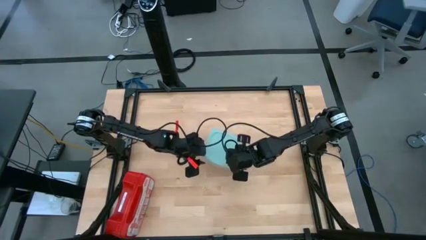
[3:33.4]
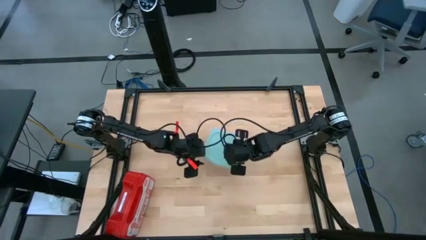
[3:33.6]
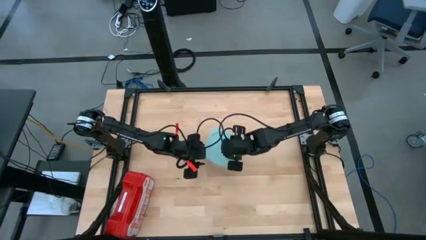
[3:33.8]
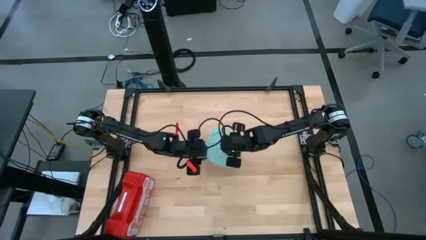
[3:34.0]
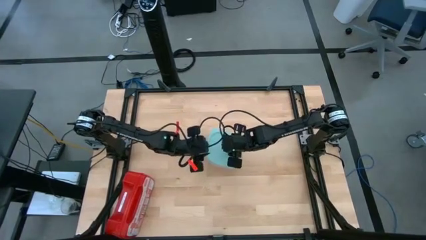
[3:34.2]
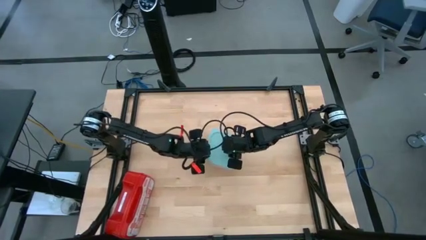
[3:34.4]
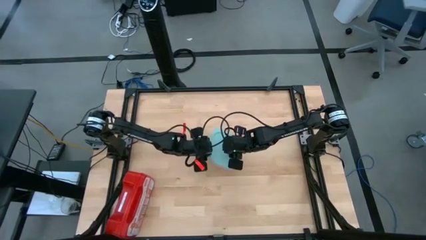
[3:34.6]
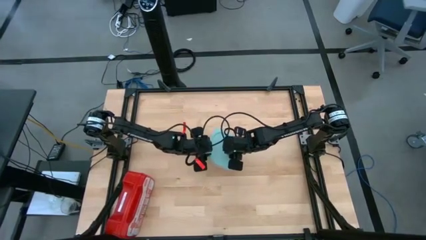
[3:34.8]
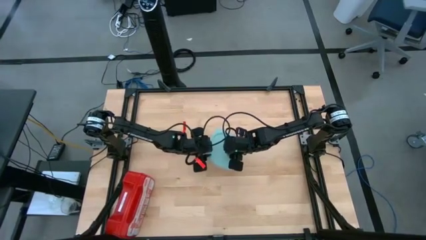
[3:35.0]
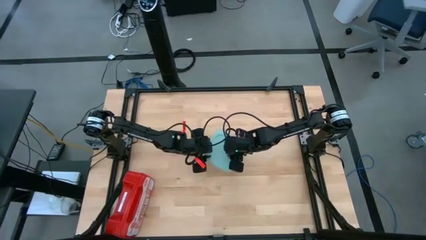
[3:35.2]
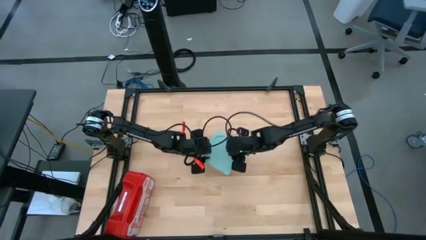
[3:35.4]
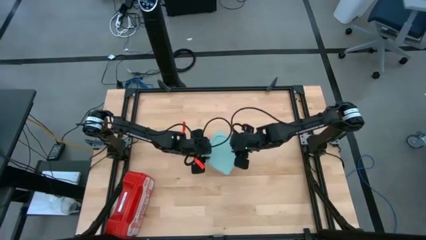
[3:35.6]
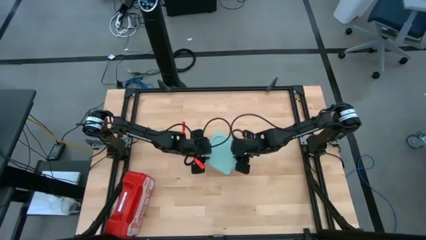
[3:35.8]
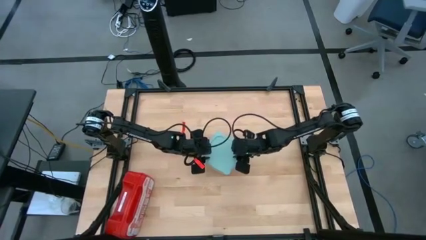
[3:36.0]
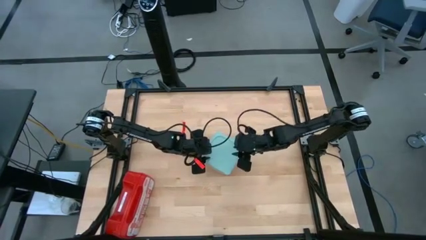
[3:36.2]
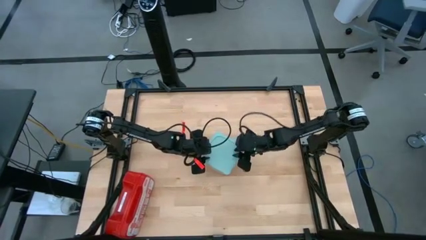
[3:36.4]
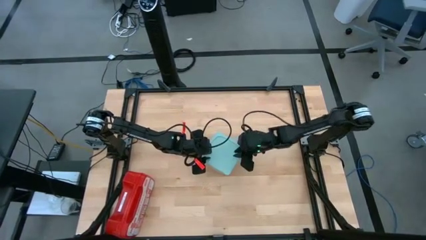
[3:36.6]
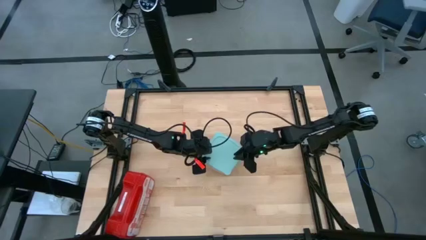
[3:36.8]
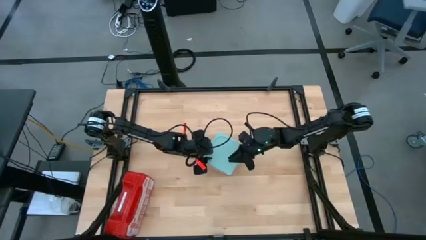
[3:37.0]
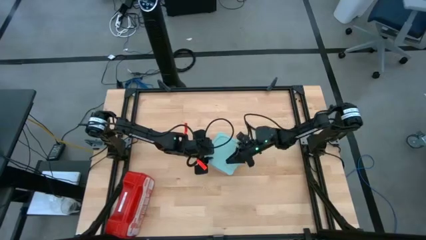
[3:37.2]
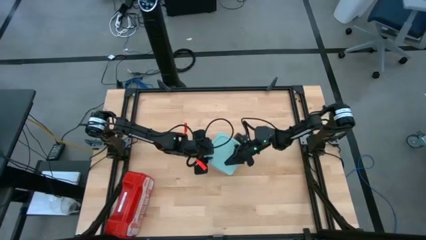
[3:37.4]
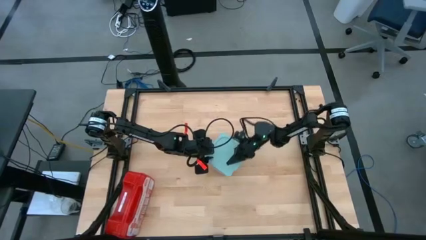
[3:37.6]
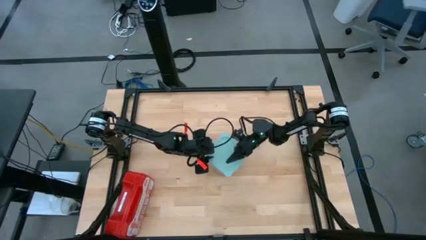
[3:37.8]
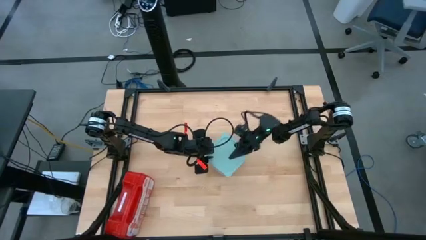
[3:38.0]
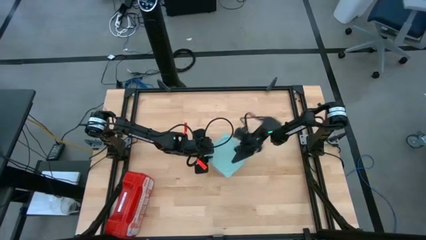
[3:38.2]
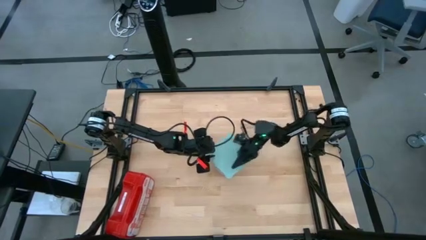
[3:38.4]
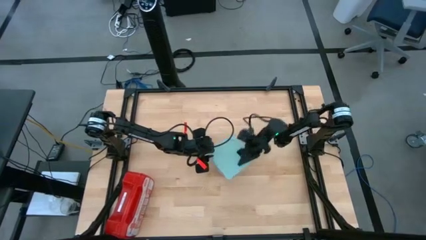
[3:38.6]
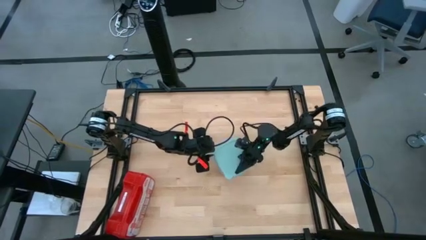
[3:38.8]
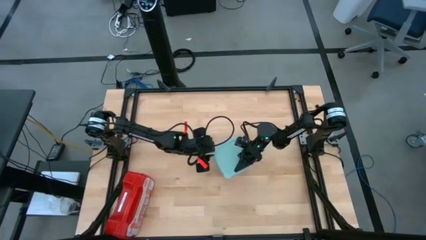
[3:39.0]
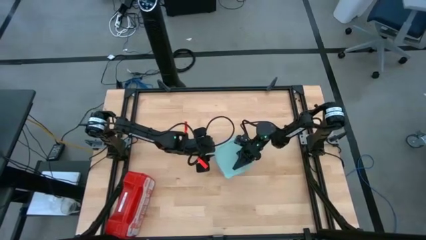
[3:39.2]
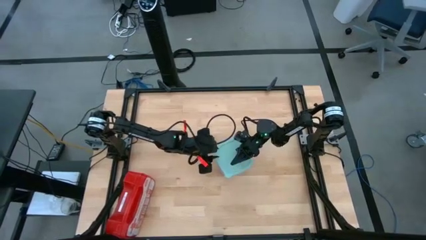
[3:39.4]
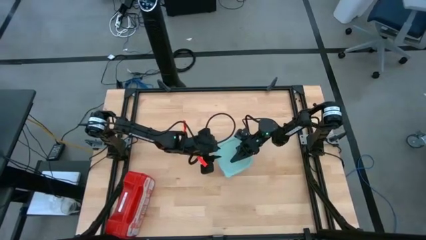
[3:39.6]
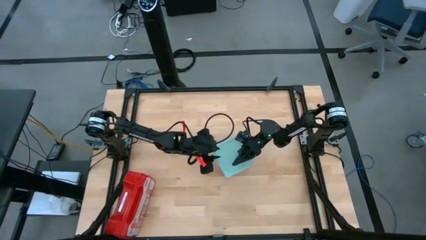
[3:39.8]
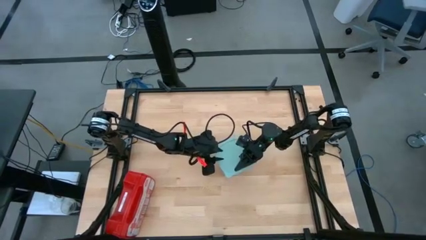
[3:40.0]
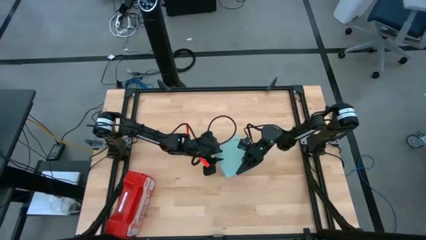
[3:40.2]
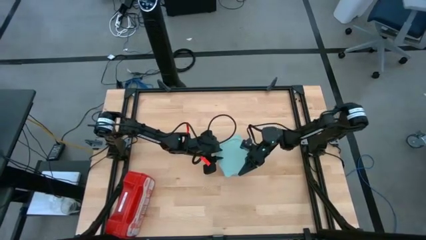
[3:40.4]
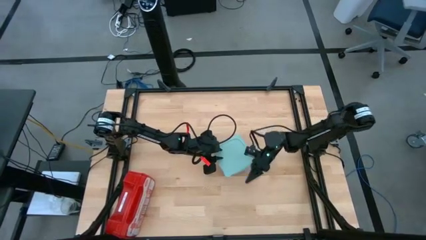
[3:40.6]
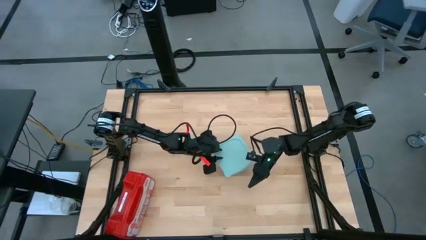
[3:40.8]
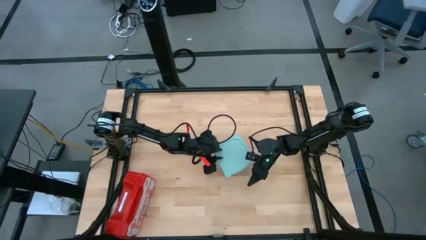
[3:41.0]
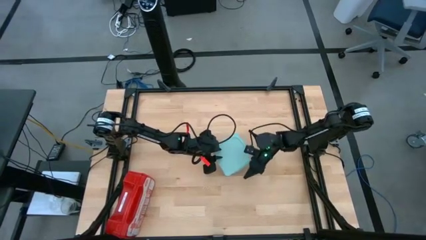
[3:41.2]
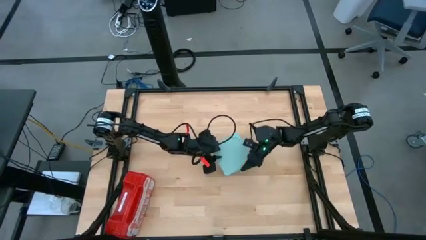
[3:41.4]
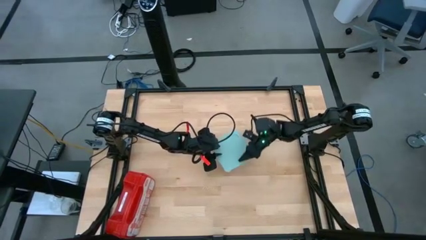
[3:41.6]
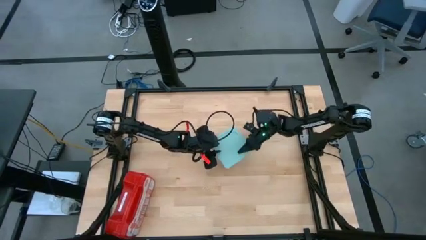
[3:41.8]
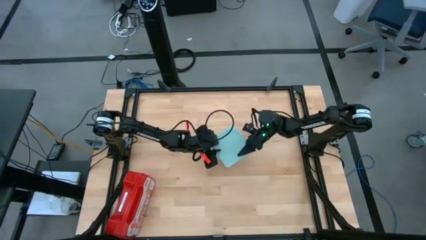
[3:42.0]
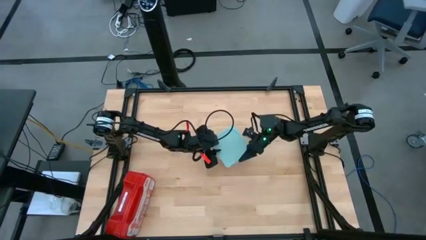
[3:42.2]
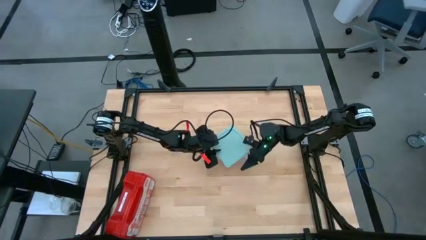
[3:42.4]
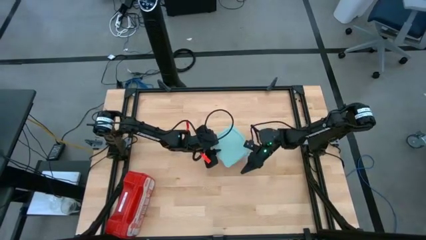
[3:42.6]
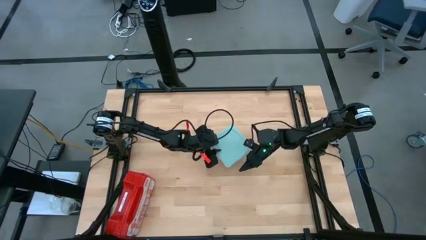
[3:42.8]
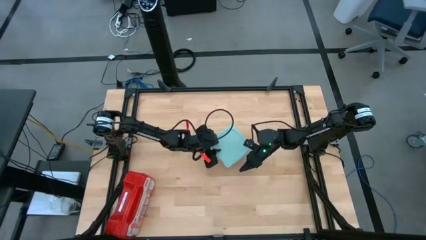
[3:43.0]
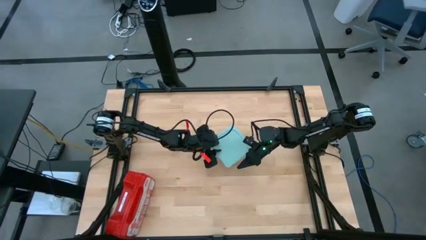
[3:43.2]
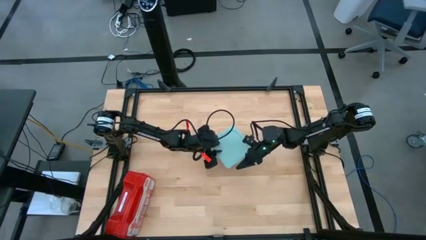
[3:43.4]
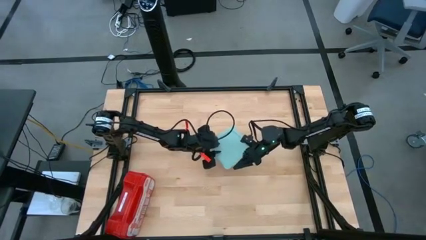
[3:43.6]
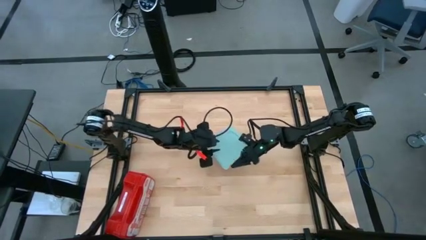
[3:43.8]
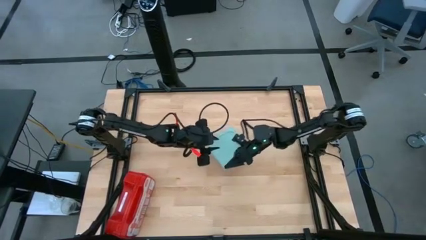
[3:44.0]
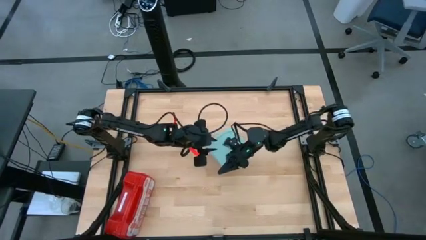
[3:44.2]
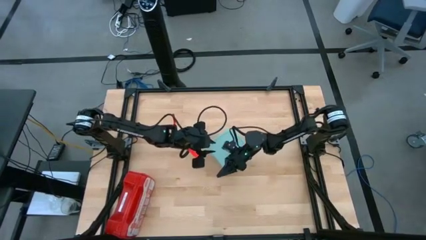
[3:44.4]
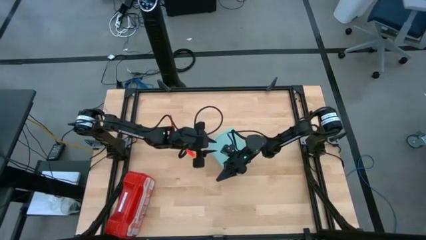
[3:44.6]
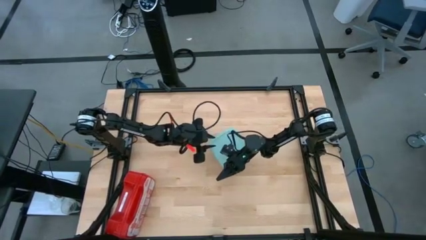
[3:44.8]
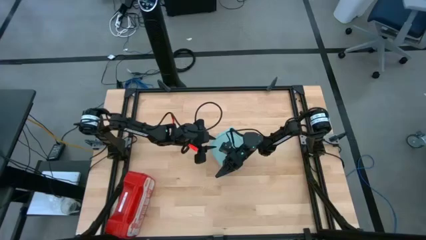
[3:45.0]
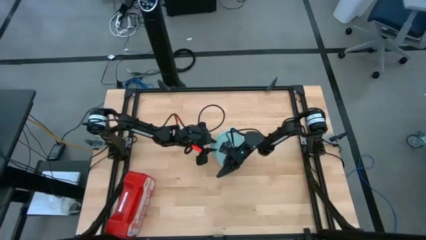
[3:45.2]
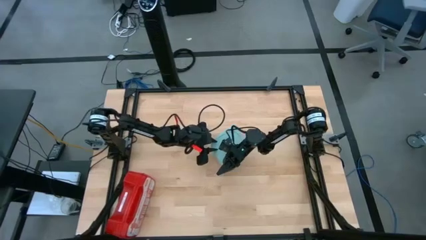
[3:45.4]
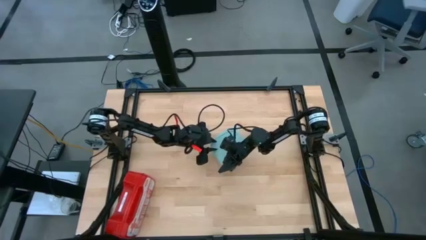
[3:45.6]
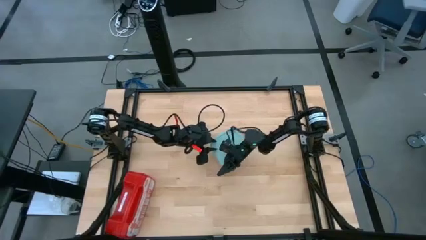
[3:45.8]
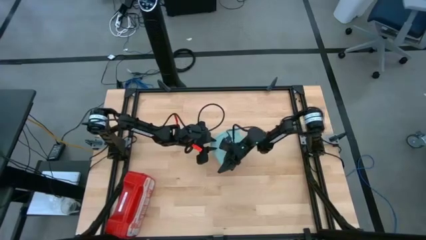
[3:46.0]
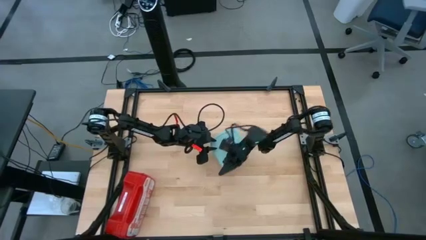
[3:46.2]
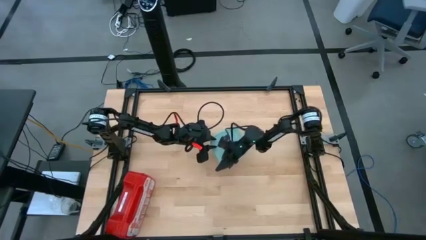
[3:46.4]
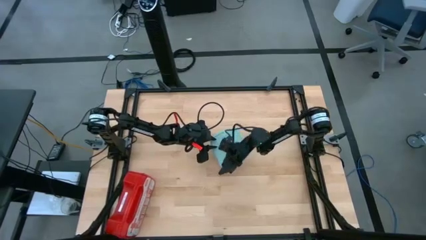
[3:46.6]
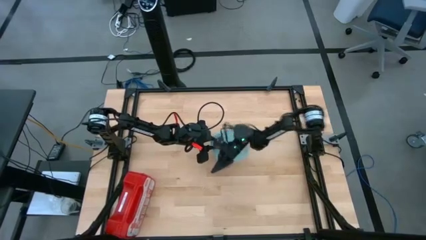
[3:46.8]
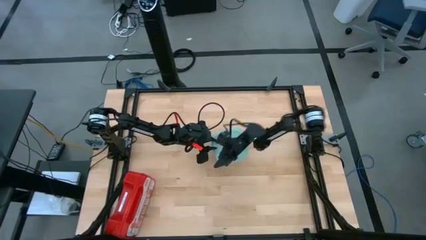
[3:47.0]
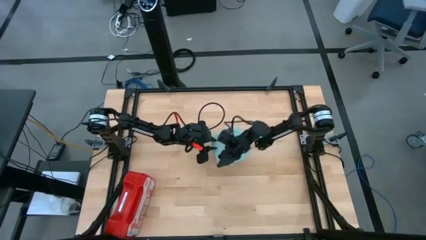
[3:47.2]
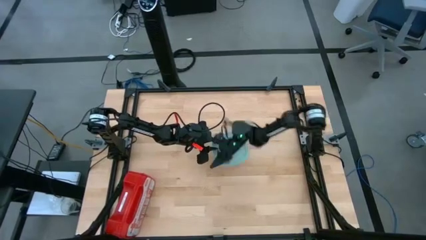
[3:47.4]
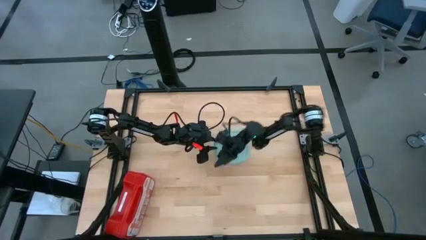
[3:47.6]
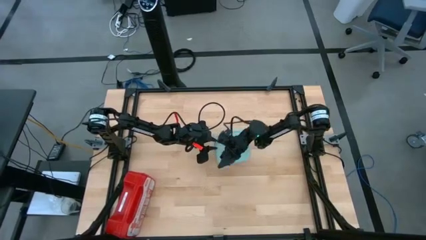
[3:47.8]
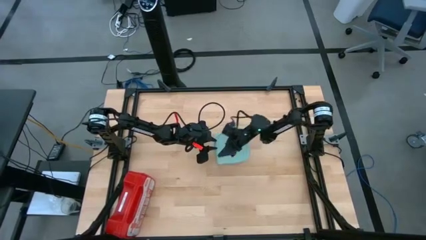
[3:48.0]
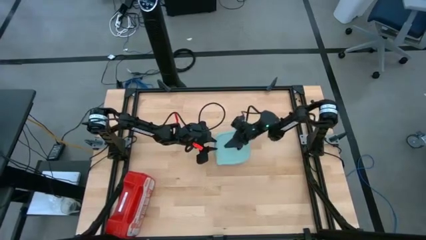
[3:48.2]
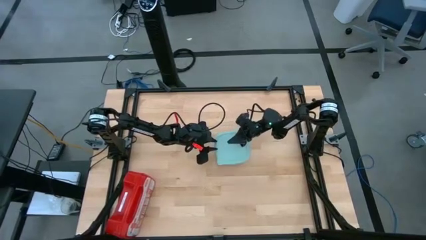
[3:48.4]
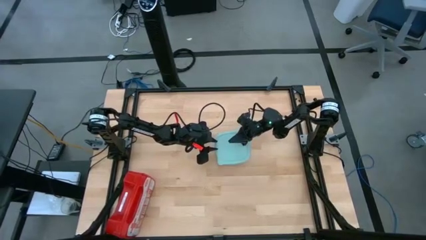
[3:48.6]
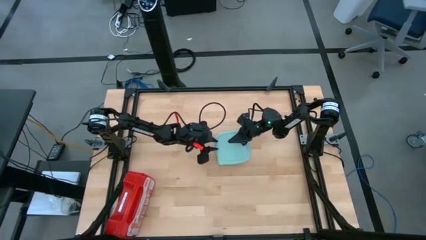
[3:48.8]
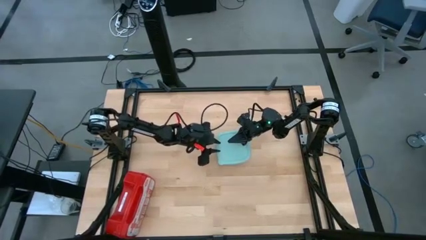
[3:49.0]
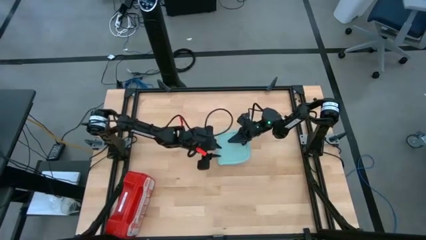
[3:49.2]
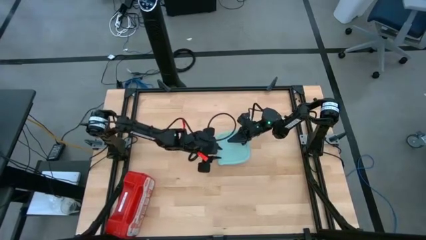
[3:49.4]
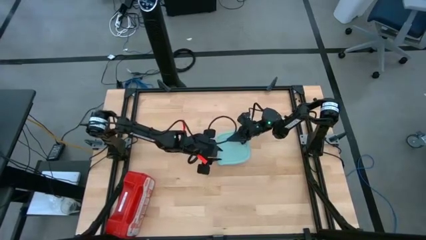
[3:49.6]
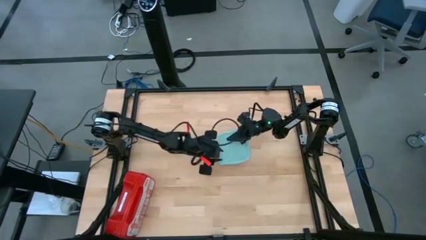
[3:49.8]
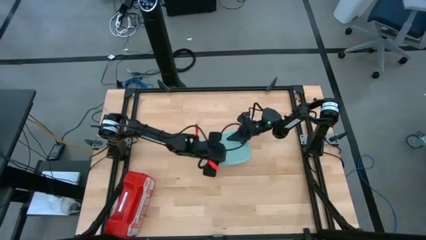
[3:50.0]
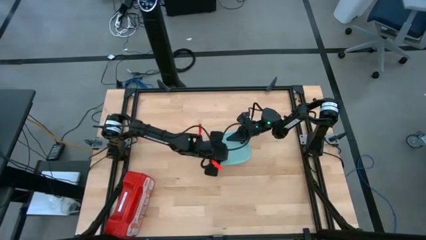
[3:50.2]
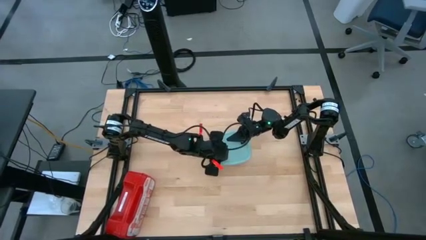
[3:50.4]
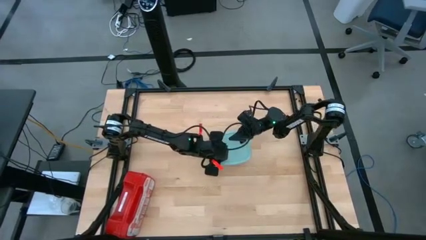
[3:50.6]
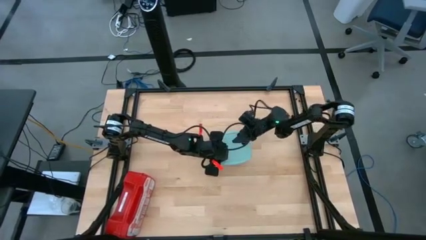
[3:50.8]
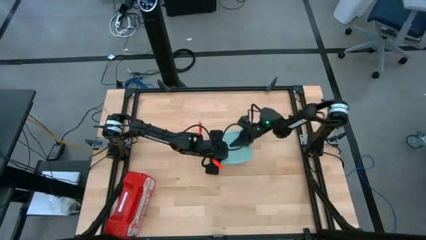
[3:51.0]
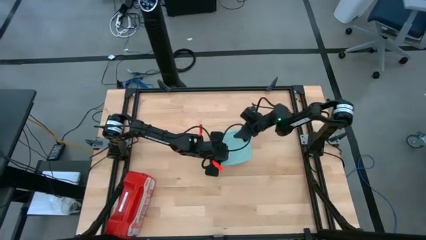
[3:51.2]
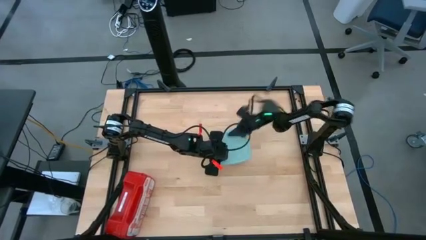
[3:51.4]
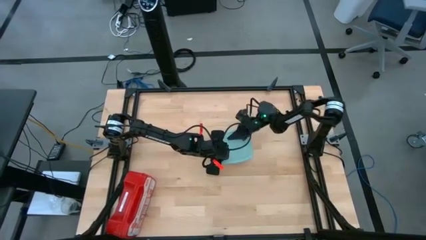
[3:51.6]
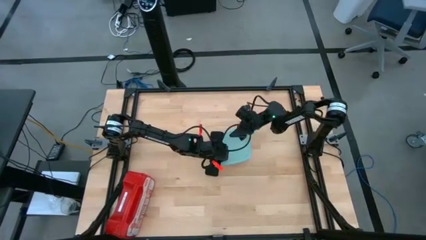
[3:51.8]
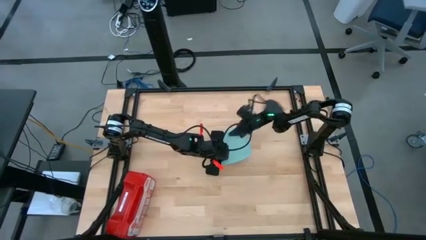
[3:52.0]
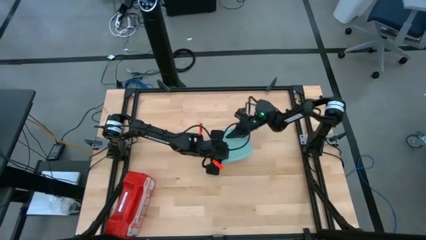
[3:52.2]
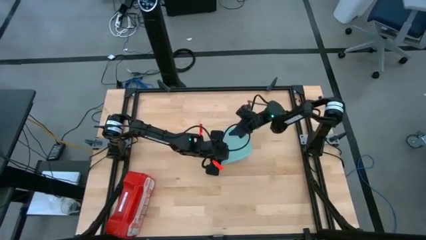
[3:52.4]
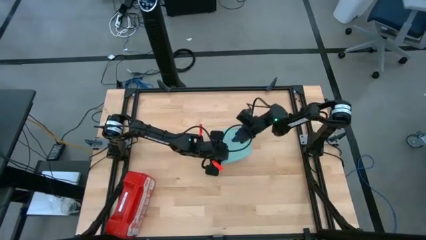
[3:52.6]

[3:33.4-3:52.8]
Task: Roll bandage
Close the green tupperware
